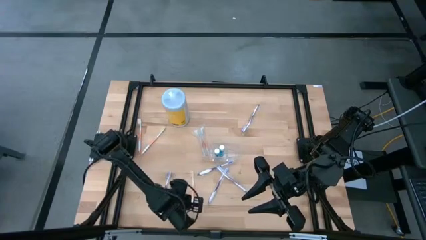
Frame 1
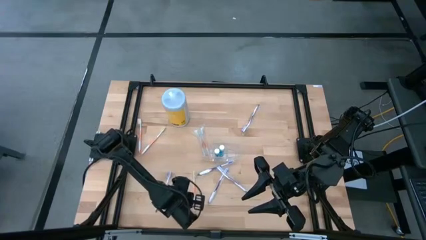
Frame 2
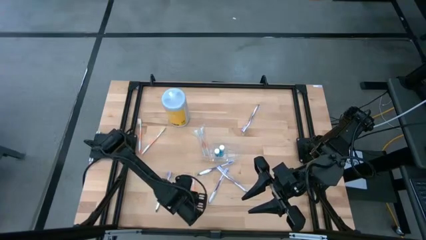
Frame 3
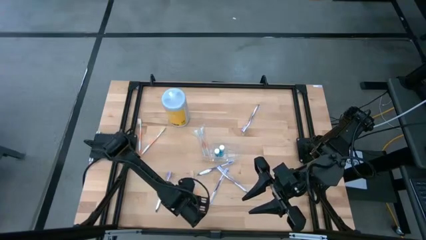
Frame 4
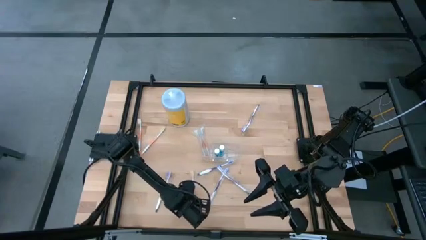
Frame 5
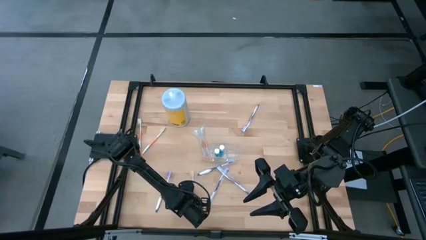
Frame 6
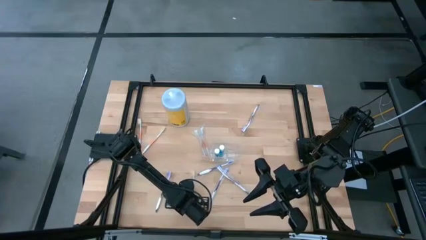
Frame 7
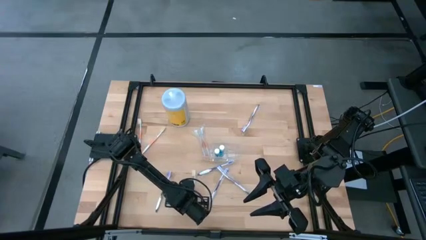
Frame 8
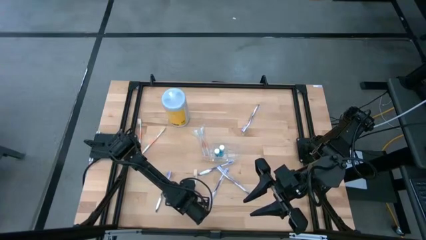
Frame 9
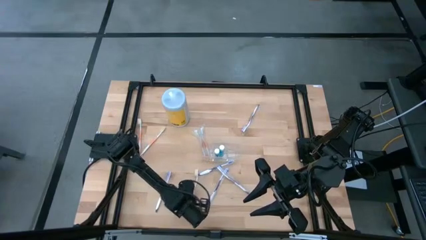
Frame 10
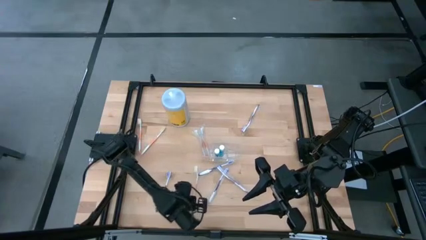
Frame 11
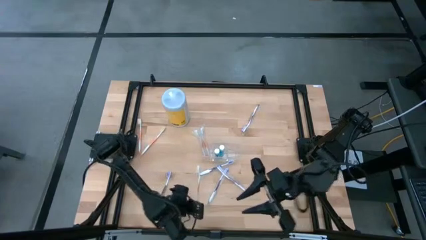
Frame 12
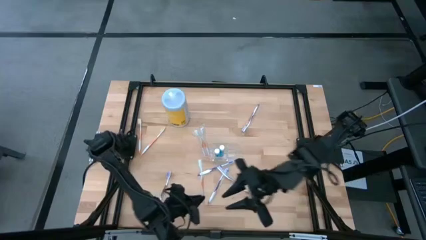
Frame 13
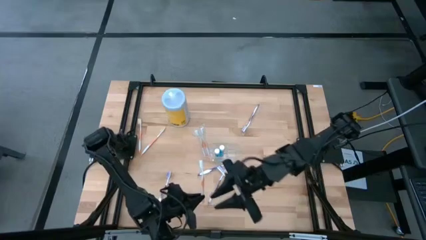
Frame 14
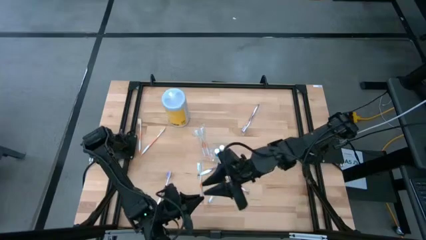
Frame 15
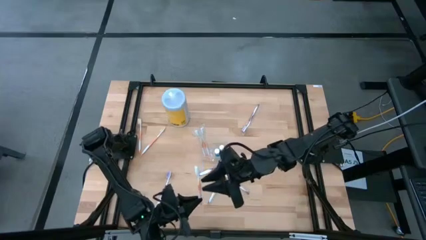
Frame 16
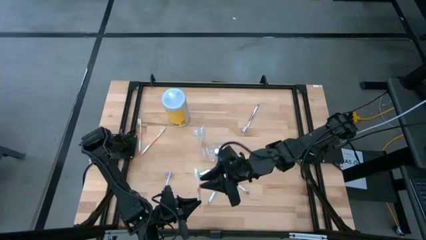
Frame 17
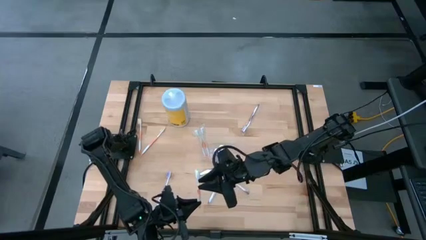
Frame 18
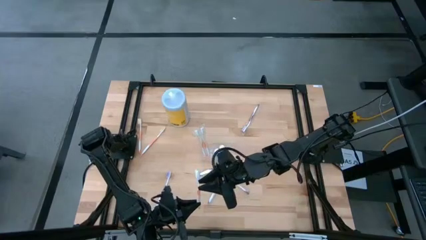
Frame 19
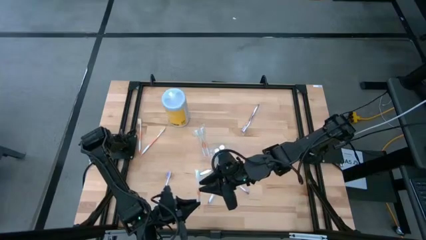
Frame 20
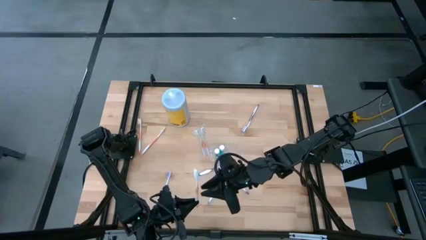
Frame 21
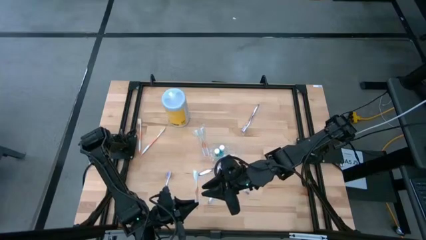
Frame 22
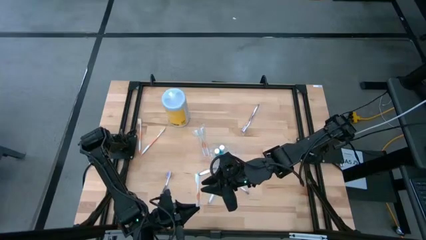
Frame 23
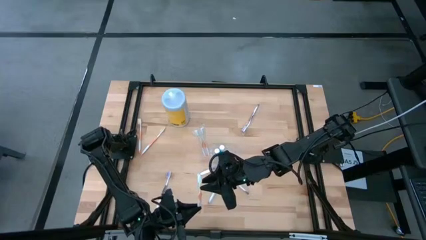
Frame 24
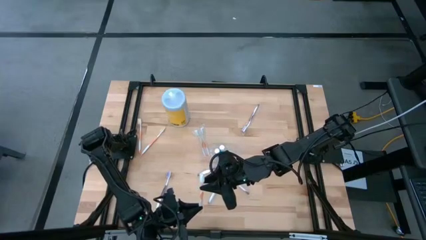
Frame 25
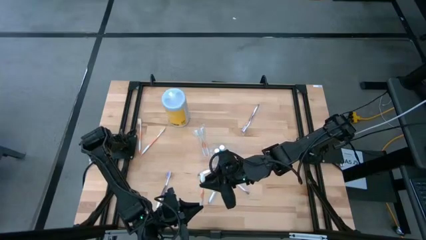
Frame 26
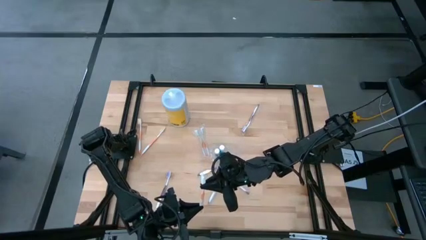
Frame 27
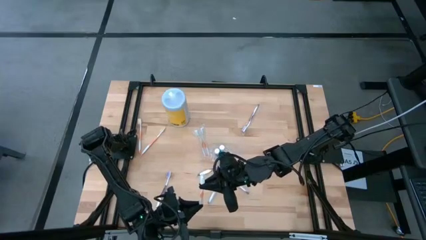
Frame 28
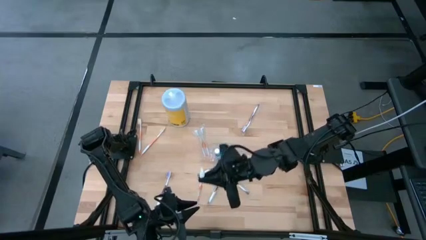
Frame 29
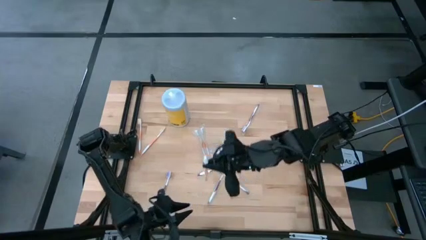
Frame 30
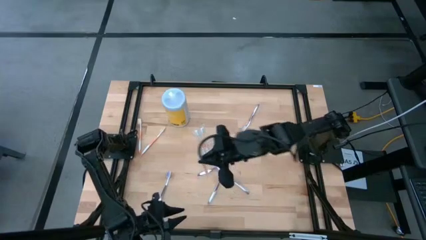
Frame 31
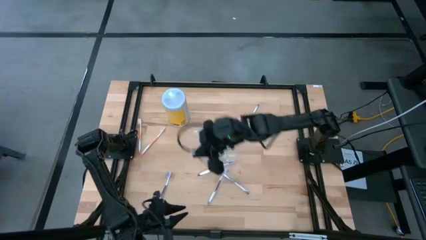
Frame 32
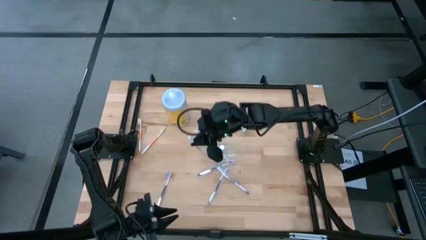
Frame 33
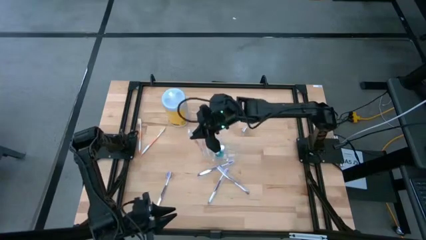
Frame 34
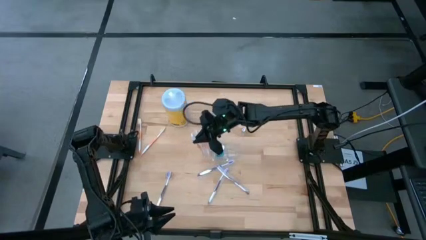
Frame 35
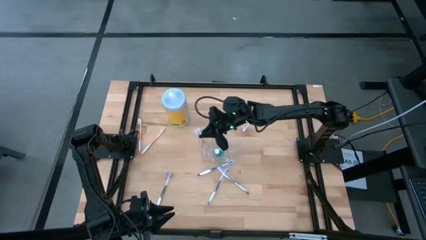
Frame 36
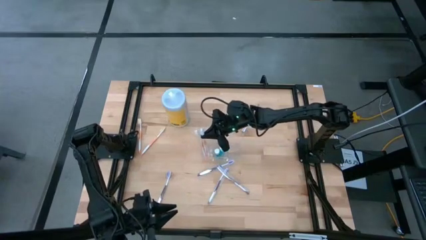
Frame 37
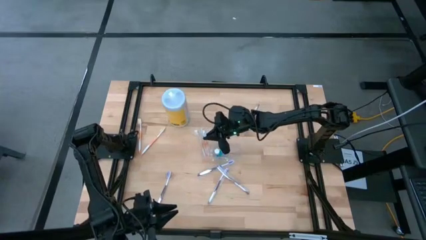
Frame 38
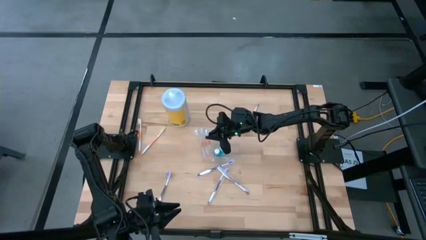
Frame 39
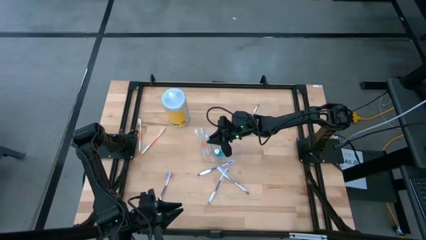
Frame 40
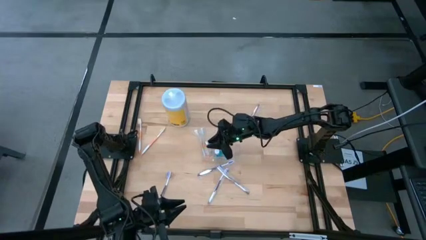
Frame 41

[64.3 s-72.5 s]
Task: Pick & Place toothbrushing station
Put the white and orange toothbrush into the left compartment of the transparent organizer

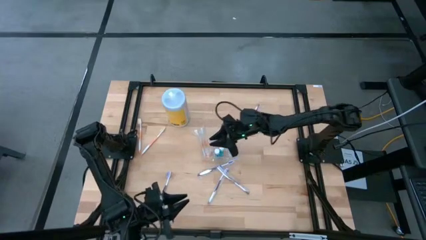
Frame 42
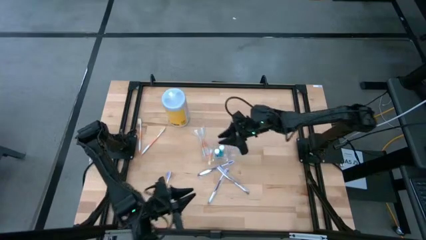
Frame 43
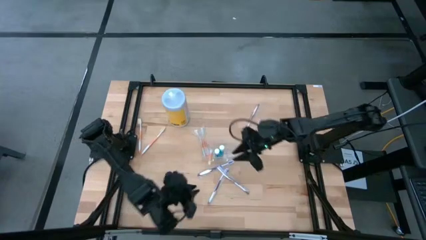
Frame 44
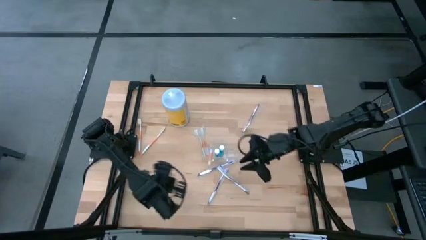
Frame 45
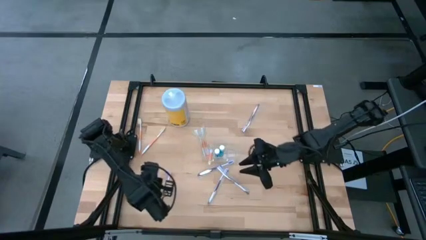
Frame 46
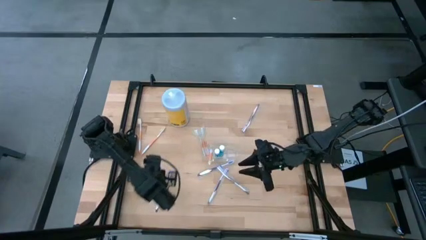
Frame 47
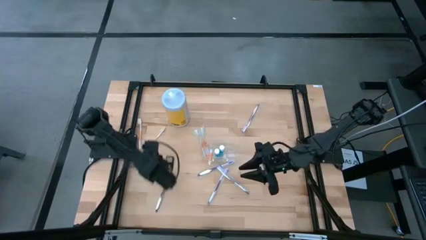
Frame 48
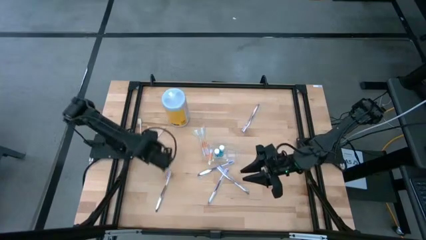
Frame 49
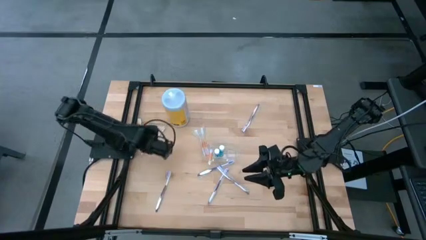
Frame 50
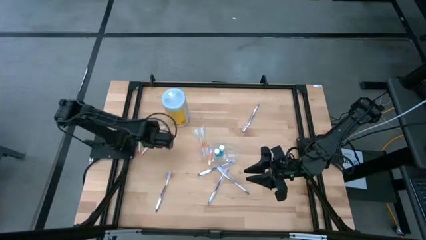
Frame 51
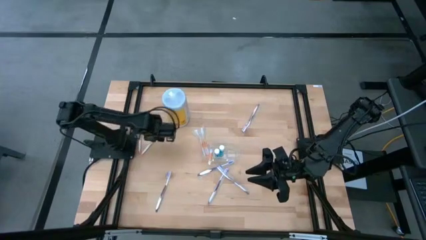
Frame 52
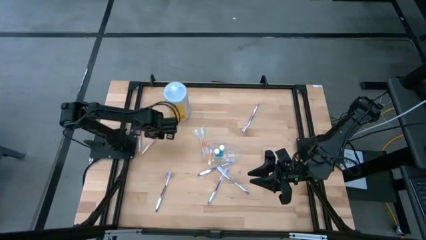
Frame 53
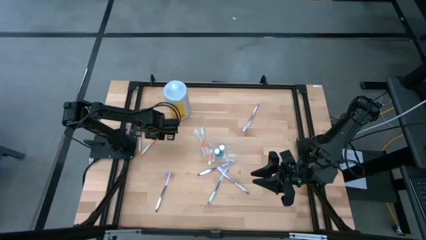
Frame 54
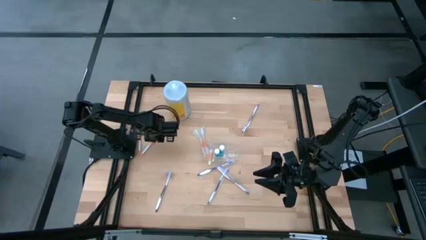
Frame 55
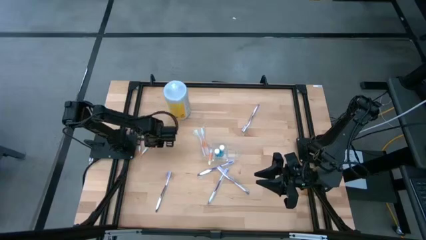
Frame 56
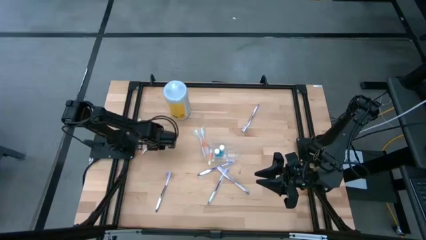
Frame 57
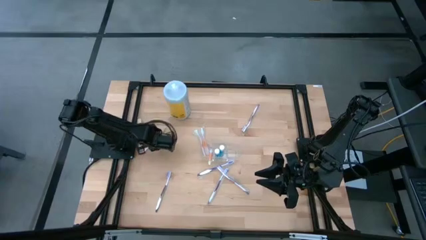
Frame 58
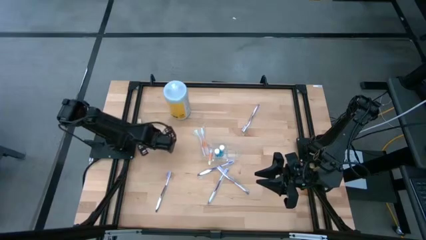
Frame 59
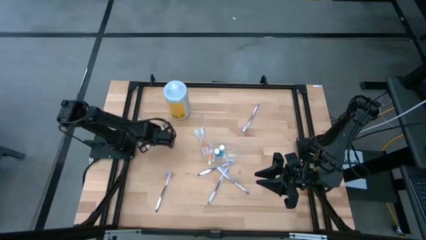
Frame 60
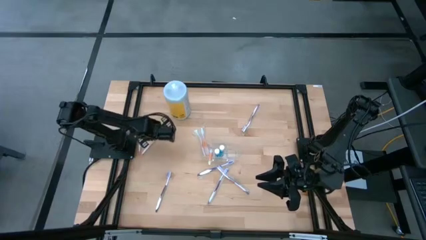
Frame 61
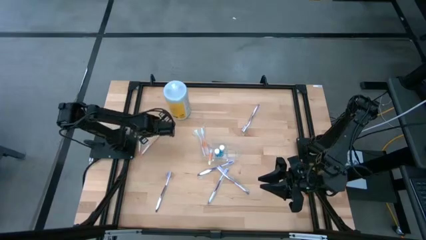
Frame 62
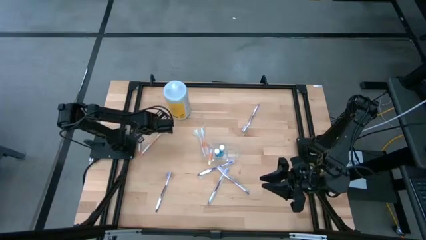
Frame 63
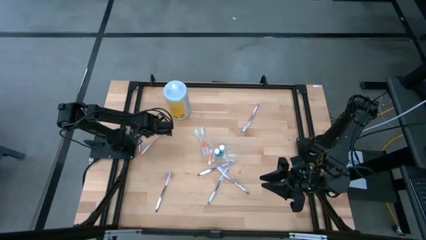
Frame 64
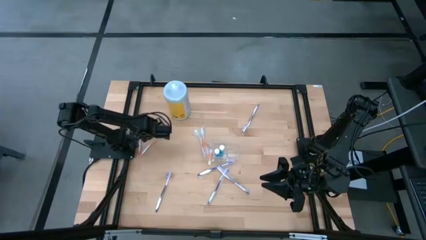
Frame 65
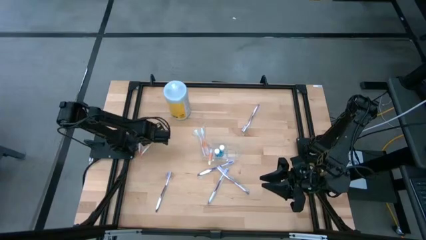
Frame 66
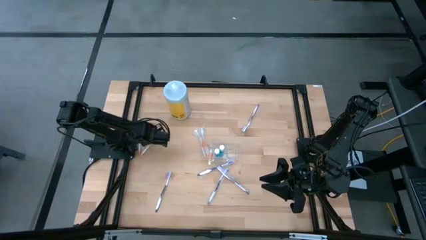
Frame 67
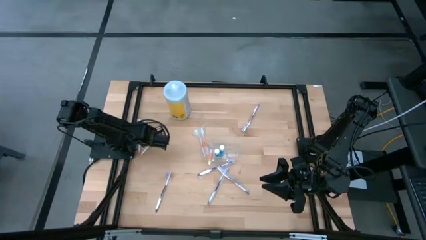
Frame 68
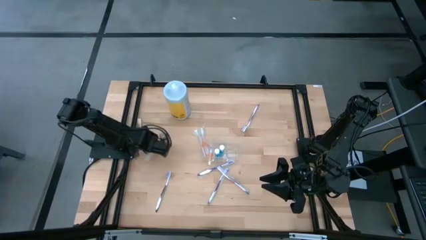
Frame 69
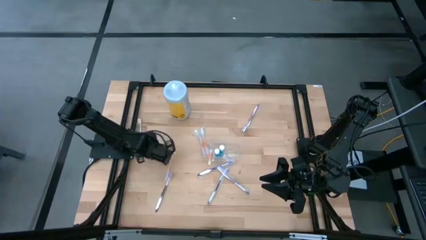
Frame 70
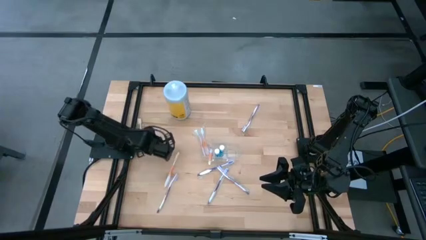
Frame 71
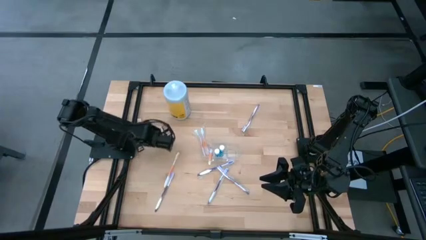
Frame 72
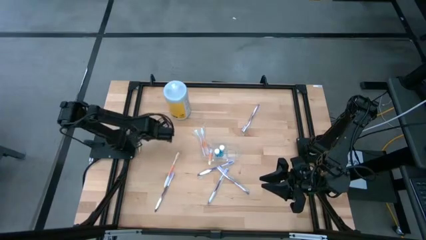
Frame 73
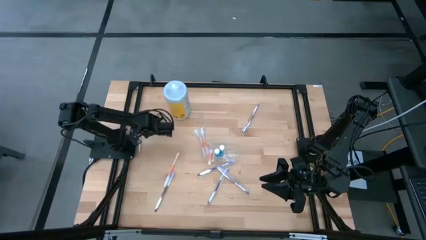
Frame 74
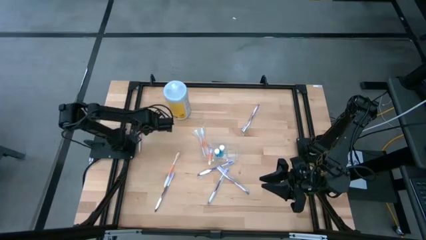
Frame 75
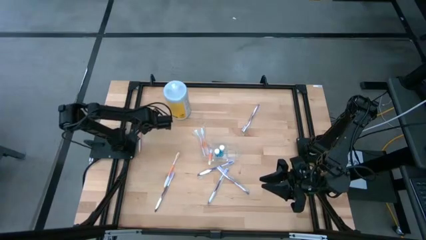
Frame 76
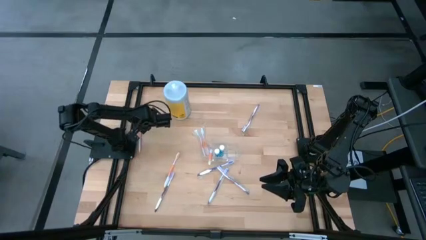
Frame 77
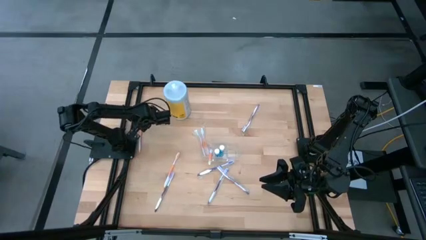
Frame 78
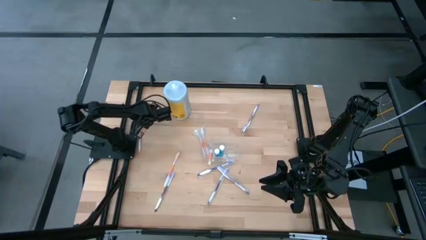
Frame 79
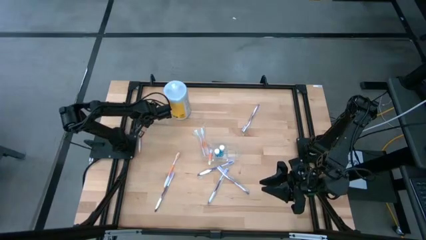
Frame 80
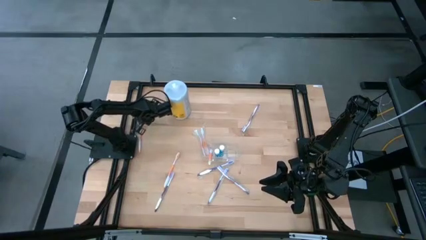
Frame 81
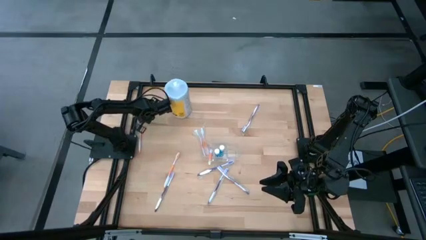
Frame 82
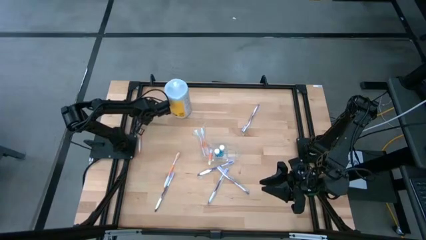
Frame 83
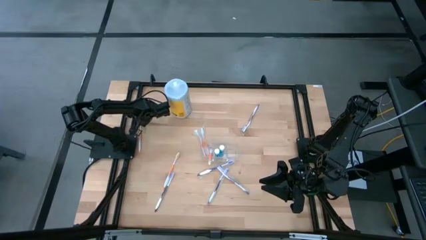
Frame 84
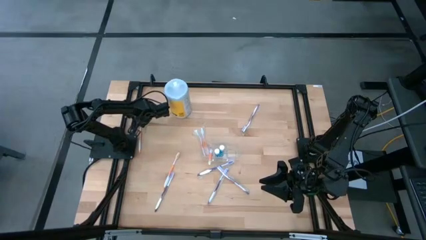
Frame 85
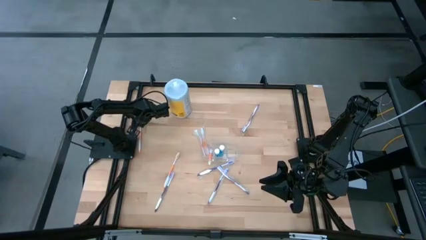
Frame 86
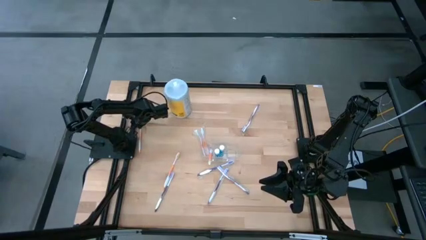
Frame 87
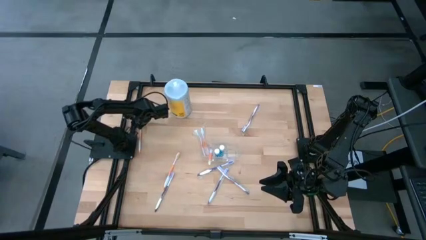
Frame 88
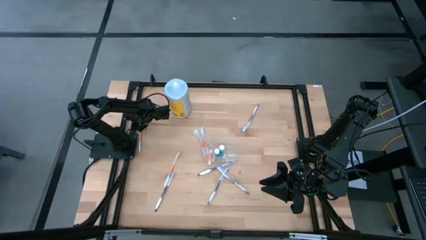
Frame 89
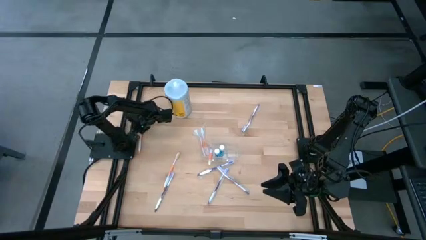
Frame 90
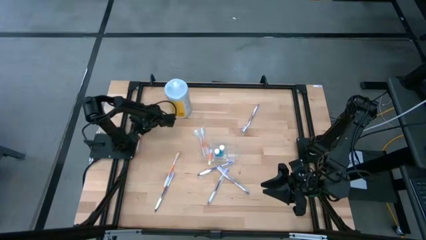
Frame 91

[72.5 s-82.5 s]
Put the white and orange toothbrush into the left compartment of the transparent organizer
